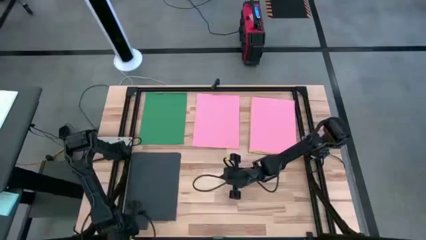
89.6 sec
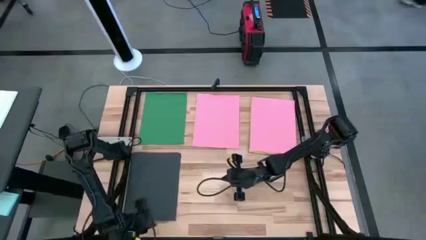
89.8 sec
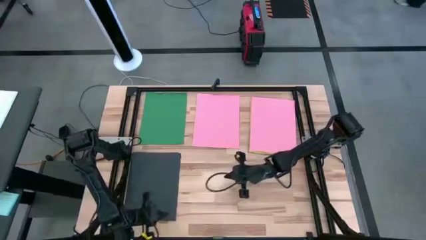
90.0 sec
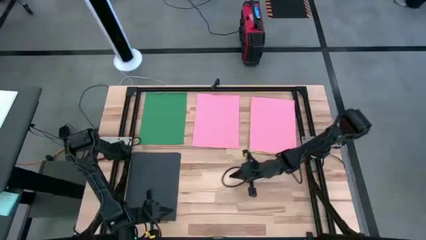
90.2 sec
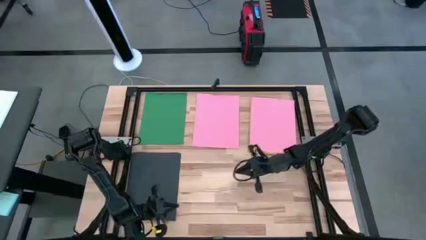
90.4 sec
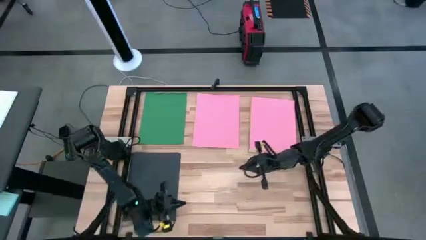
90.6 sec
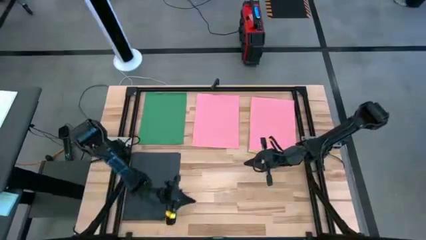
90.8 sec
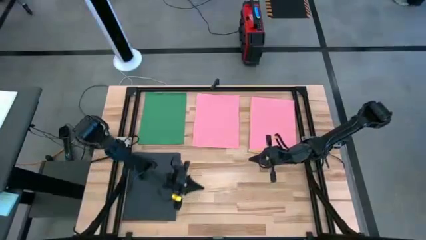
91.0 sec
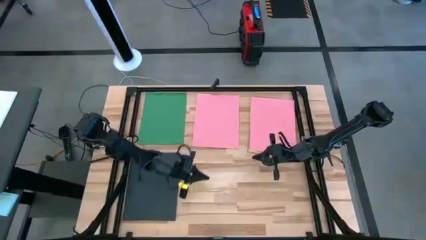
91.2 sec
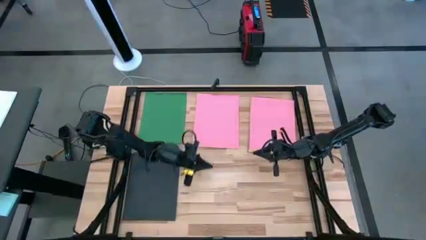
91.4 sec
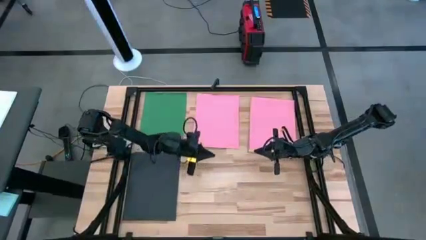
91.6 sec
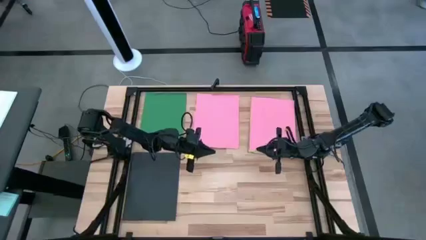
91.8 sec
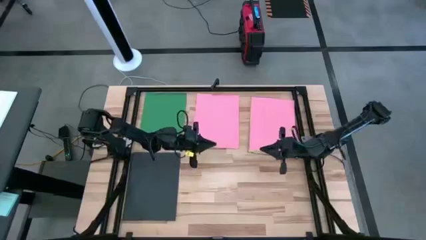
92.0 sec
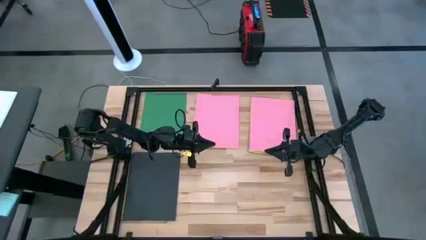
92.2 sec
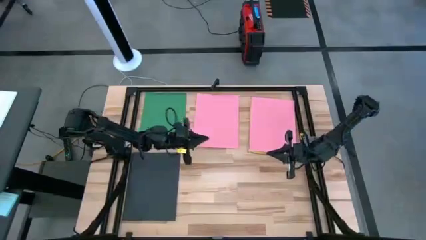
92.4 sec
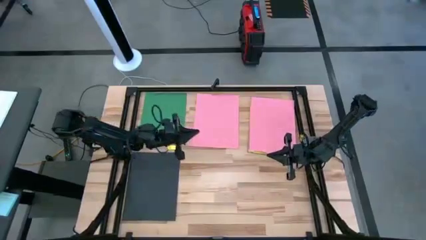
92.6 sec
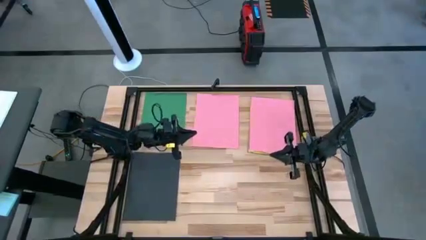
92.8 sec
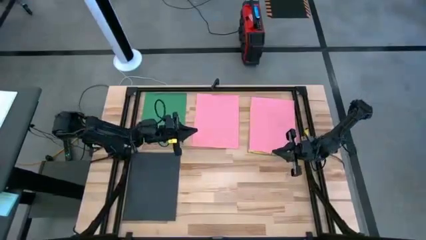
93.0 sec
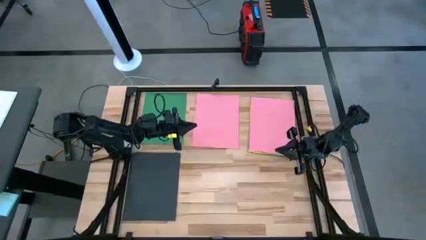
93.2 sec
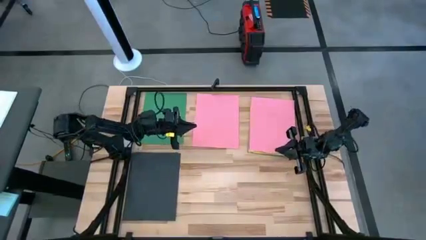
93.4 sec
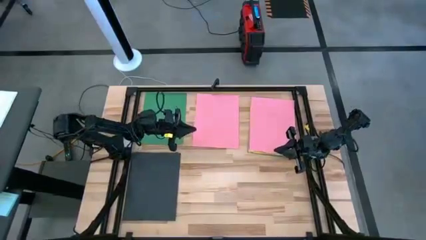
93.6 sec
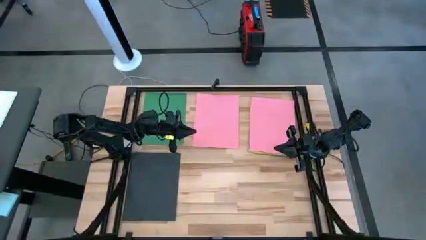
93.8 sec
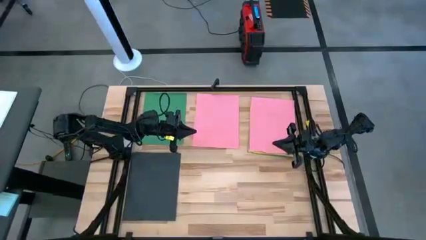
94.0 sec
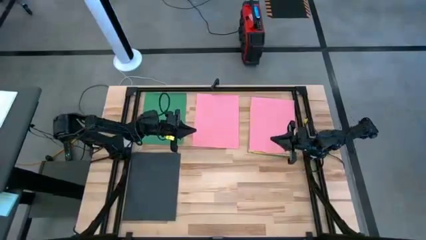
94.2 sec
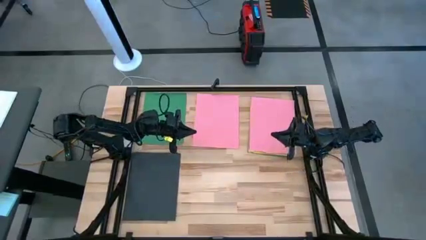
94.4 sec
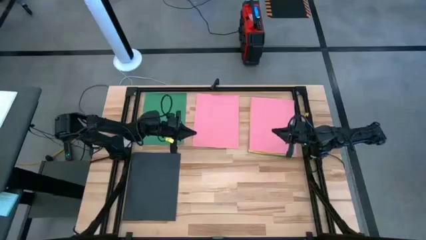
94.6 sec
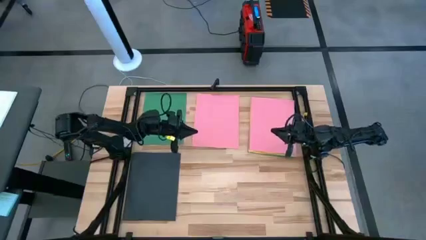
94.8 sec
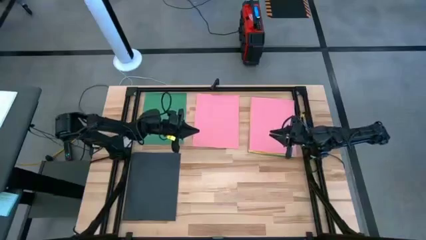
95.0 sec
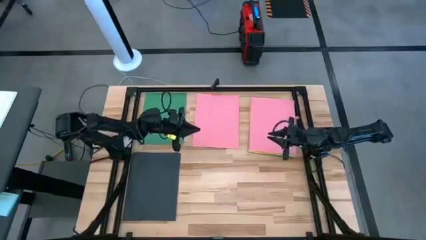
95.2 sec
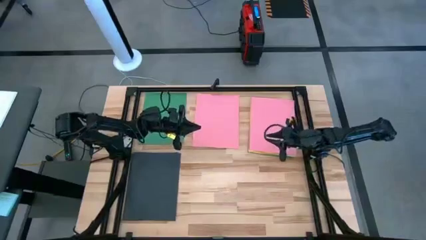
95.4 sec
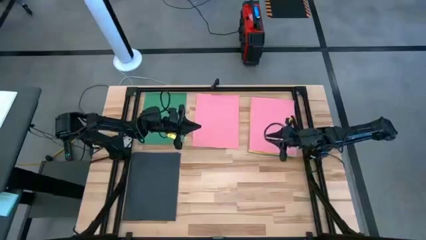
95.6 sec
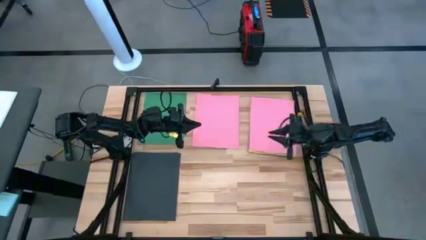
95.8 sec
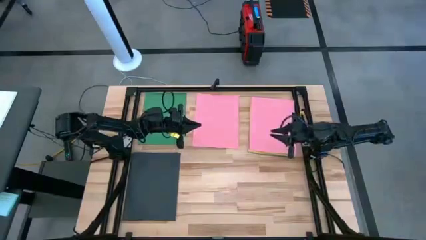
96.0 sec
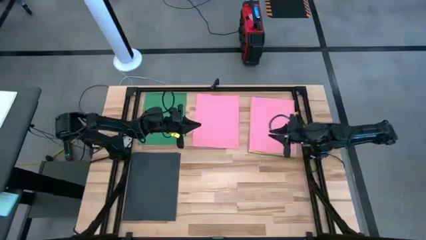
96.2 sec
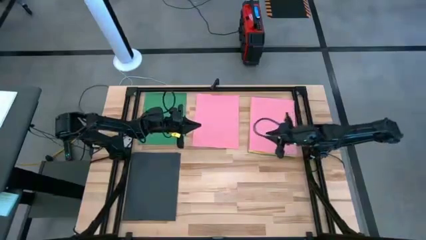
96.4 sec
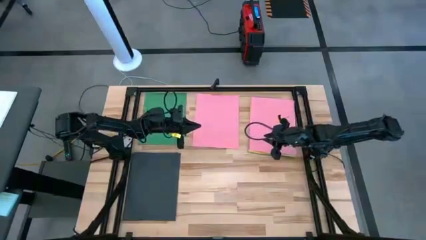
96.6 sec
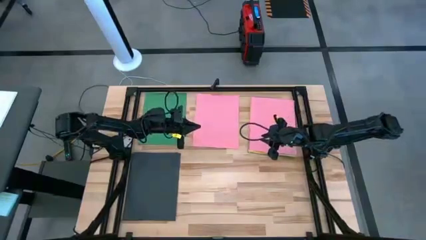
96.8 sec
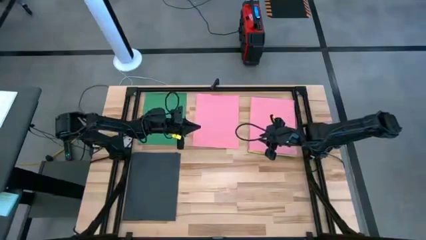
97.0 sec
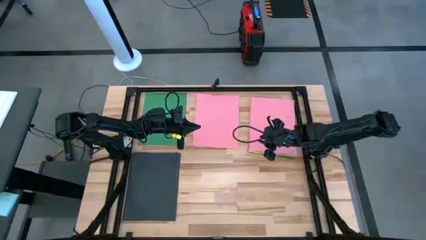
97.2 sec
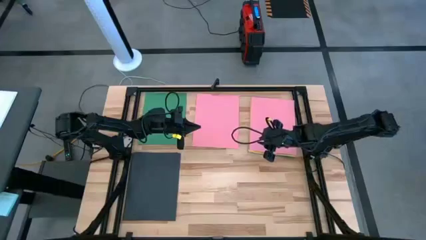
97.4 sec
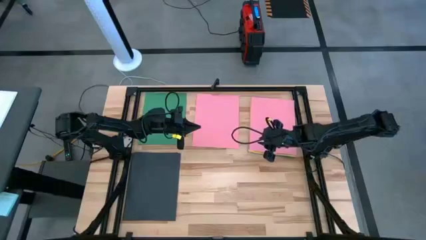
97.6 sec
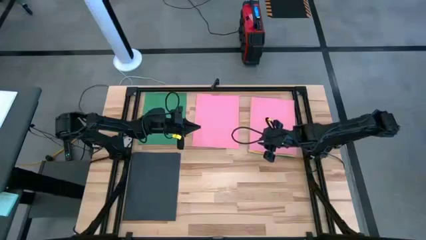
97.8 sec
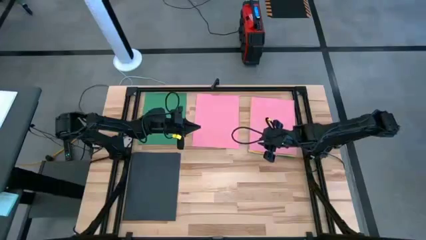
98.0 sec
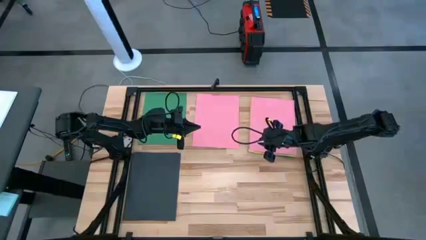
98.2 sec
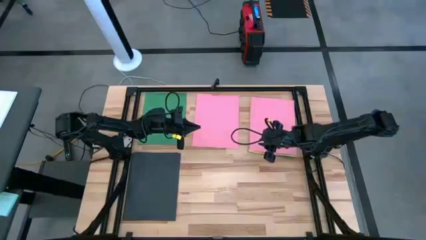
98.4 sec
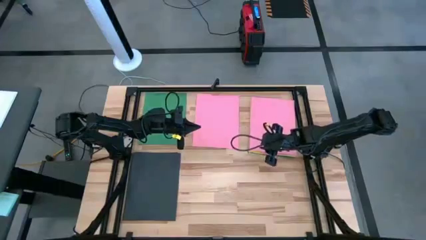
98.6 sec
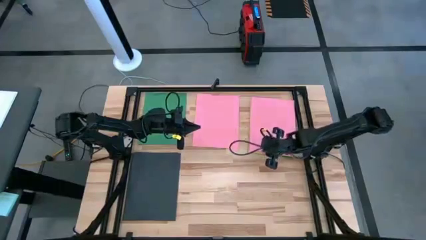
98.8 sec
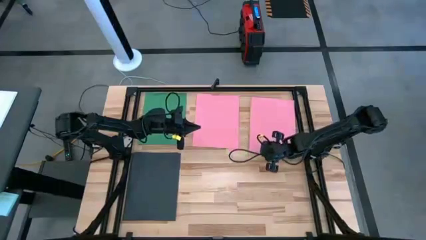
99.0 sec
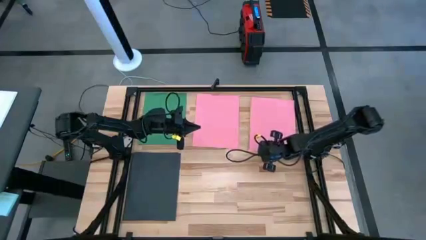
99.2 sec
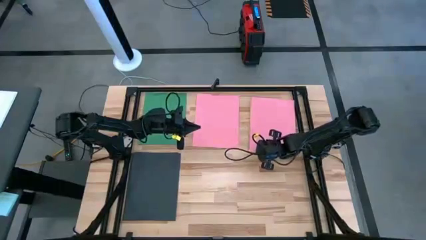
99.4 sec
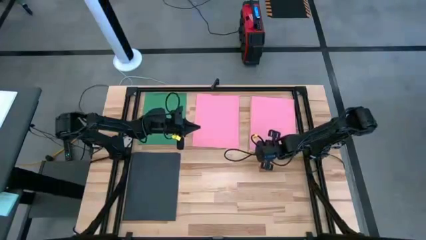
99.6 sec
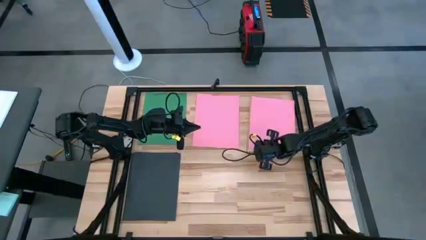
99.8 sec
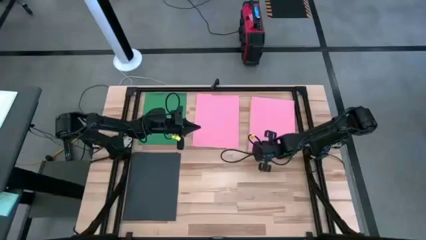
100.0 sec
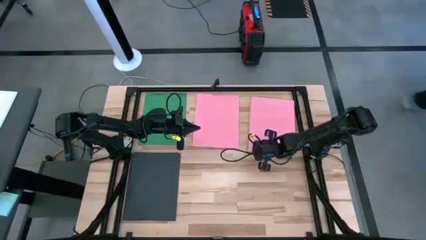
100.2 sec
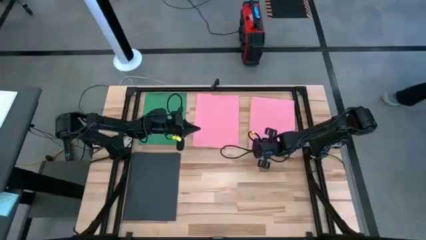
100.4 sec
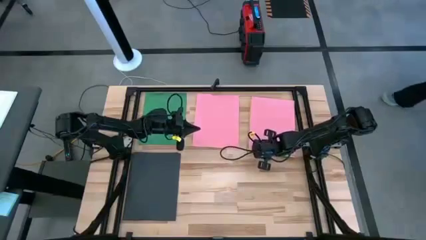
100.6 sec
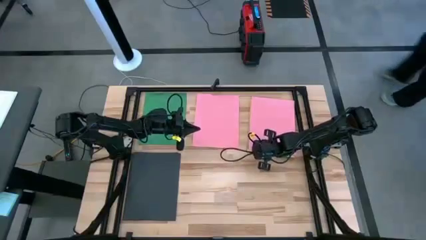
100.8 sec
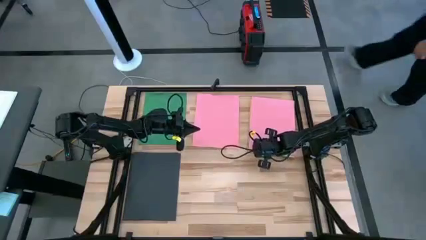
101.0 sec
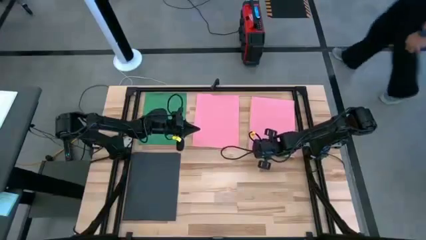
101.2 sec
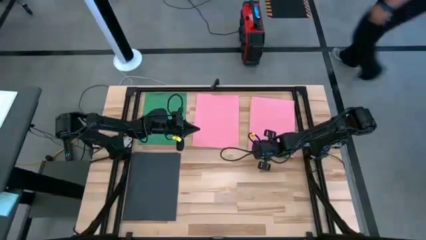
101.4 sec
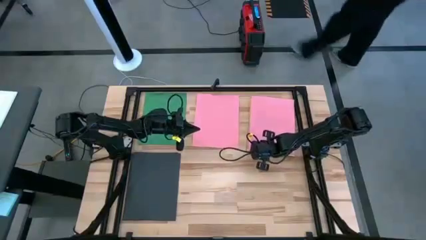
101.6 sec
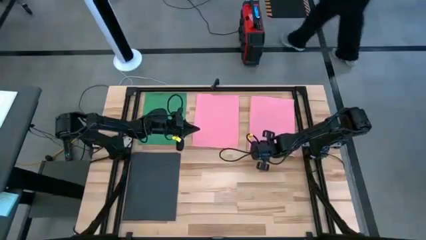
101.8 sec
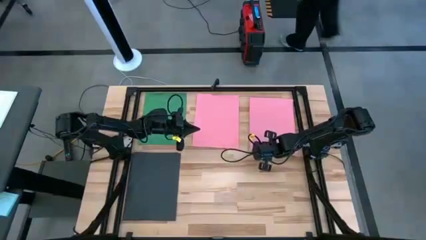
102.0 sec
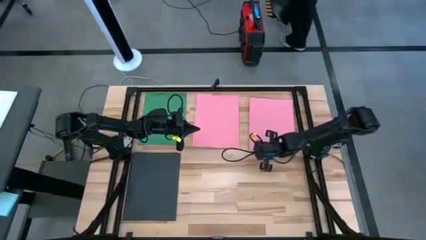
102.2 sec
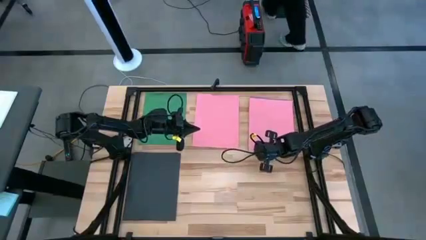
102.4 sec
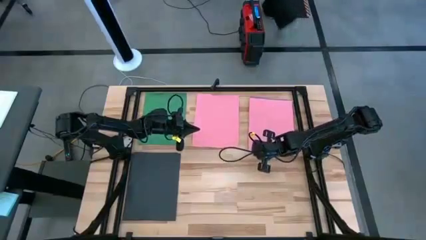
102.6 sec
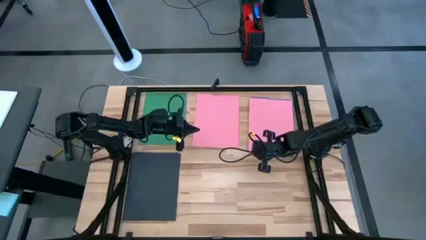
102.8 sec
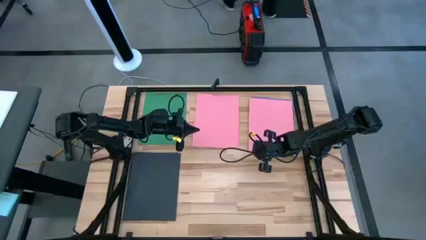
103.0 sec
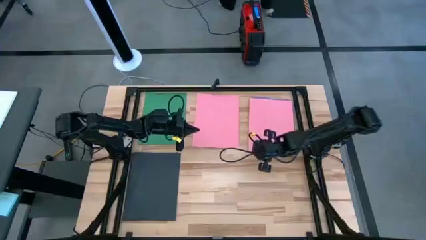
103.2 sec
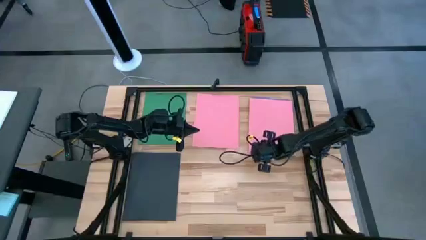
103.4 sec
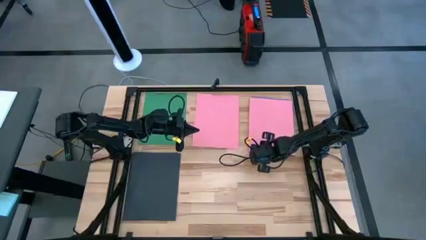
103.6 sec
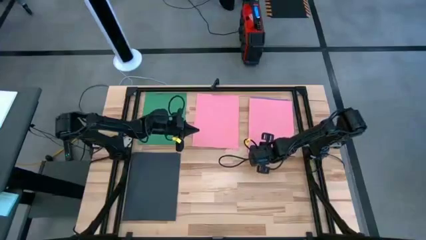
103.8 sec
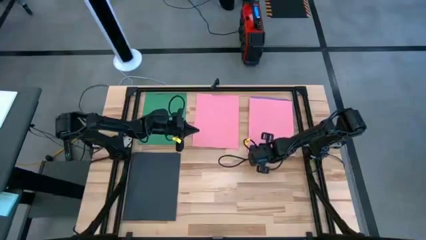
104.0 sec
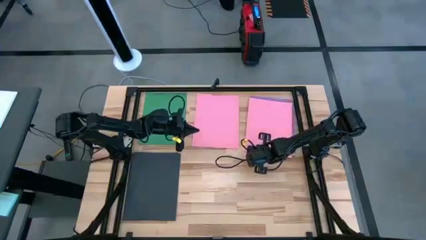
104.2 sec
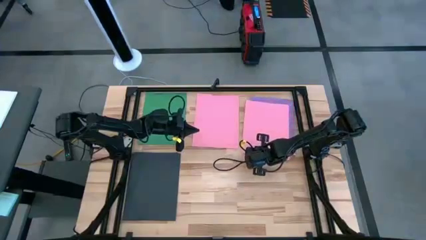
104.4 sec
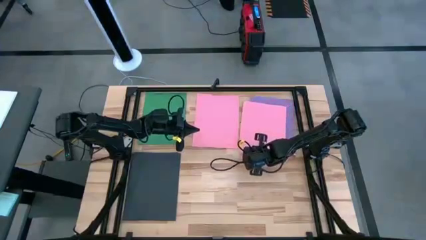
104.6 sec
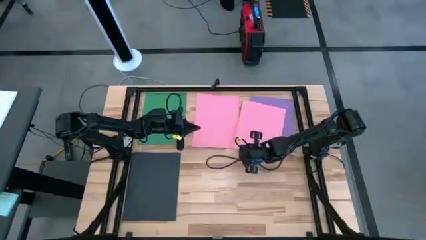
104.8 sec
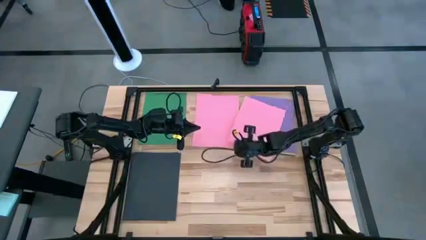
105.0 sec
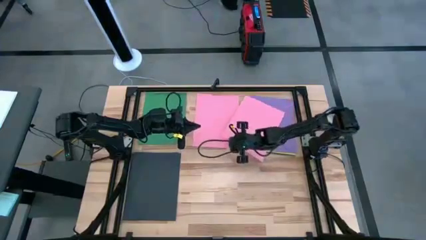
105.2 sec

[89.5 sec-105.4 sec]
Task: Organize paper
Stack the pink paper on top of the pink paper
